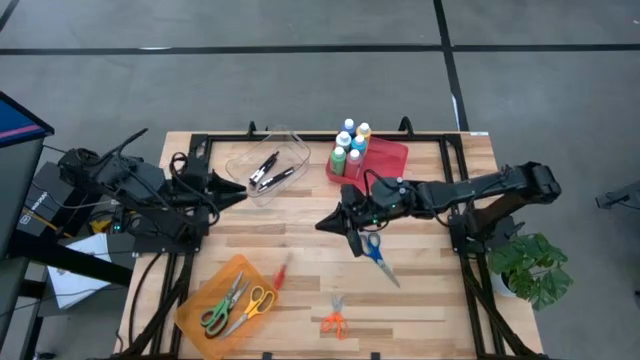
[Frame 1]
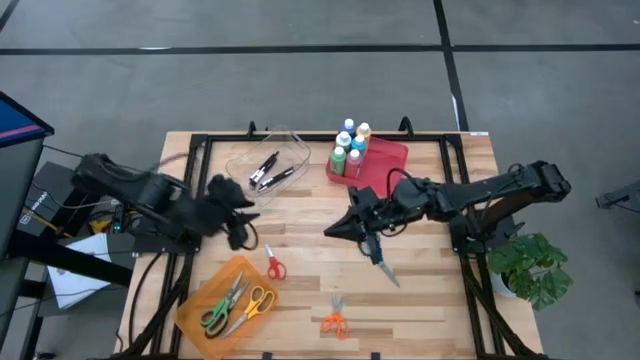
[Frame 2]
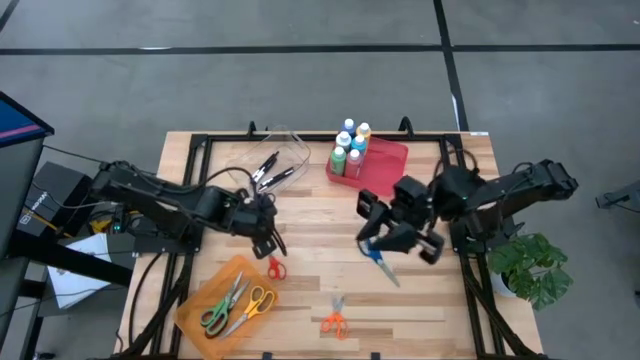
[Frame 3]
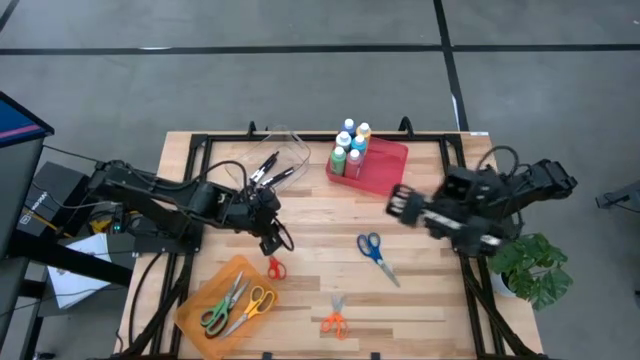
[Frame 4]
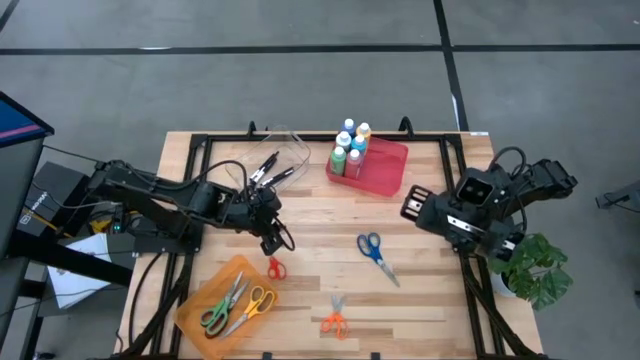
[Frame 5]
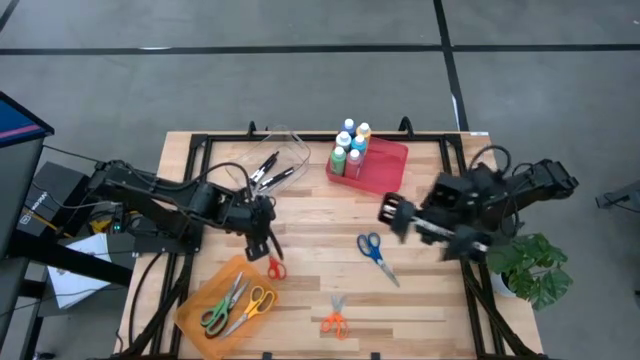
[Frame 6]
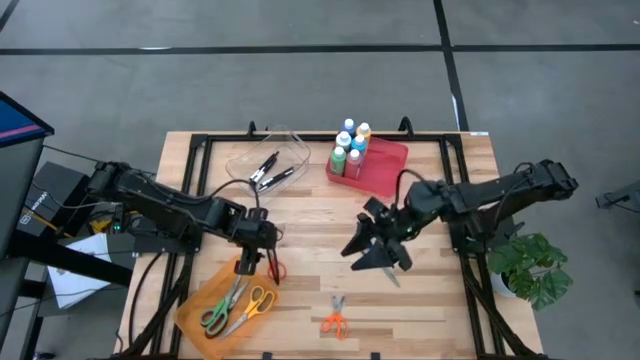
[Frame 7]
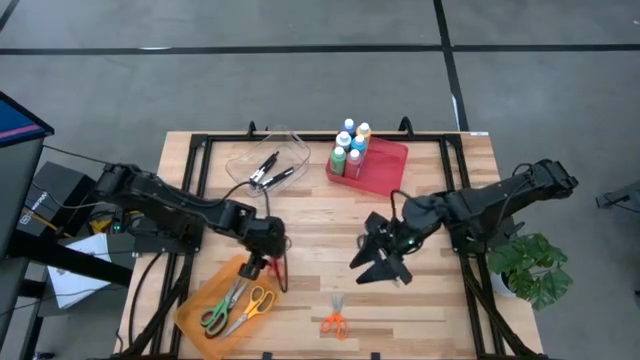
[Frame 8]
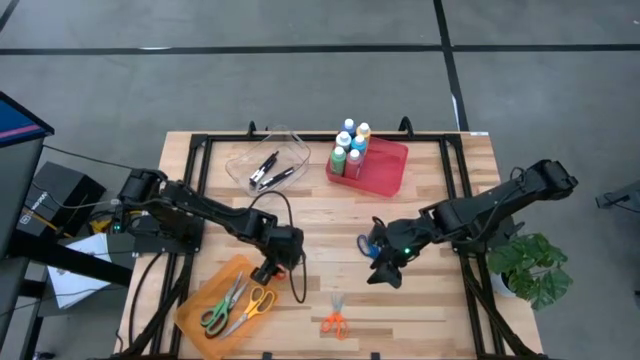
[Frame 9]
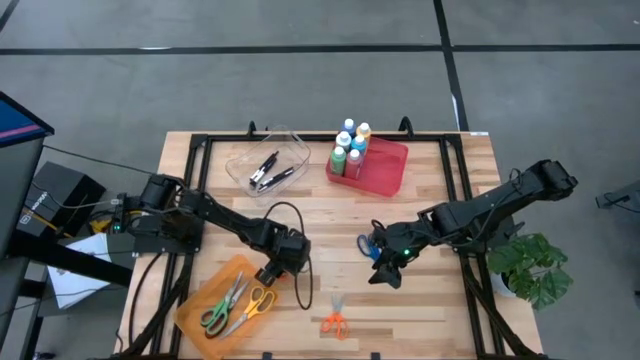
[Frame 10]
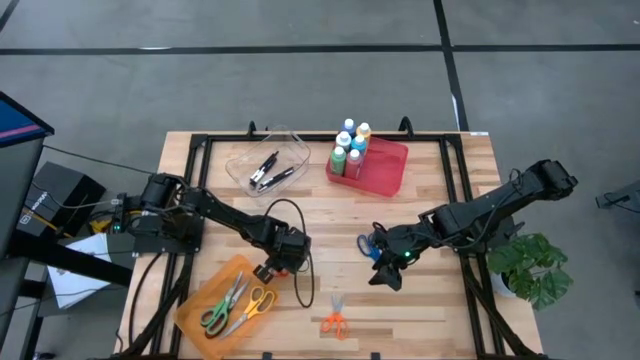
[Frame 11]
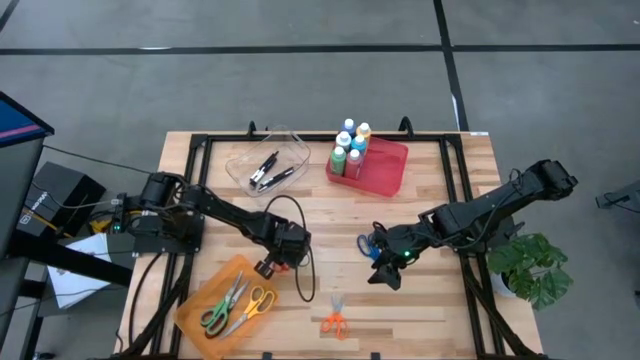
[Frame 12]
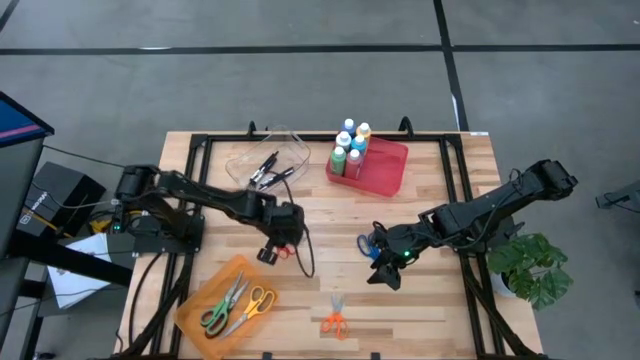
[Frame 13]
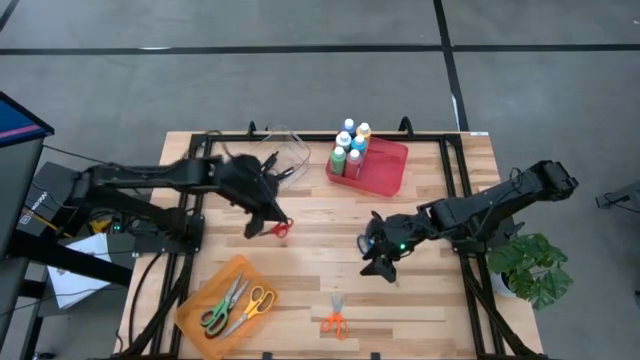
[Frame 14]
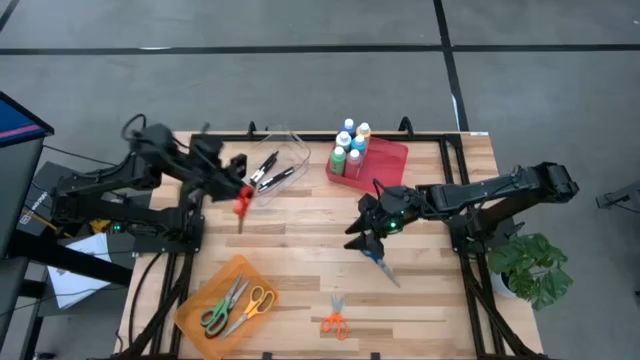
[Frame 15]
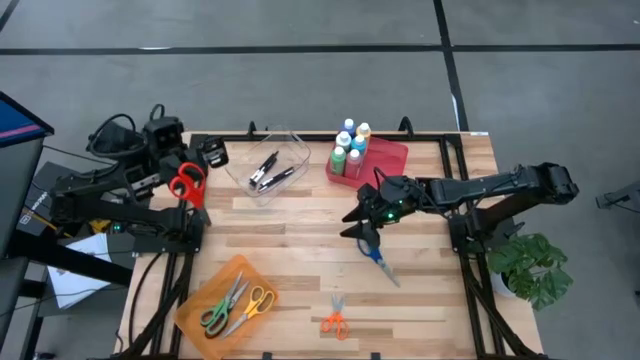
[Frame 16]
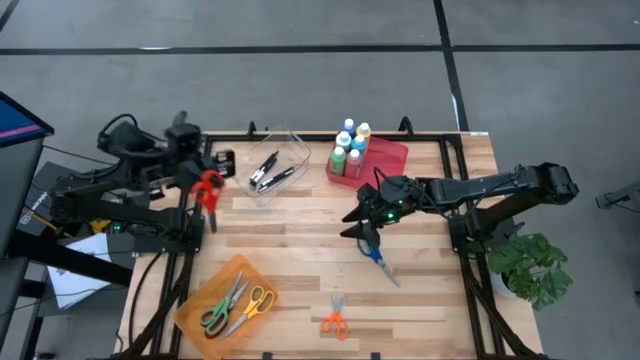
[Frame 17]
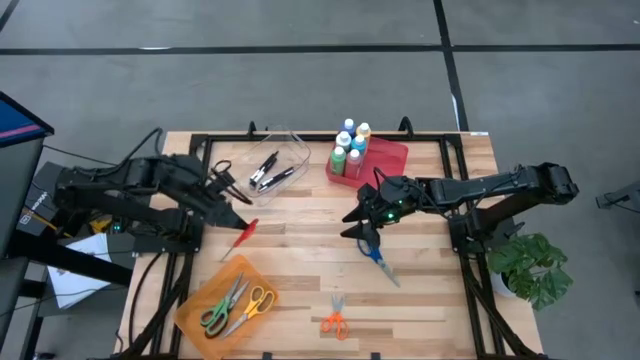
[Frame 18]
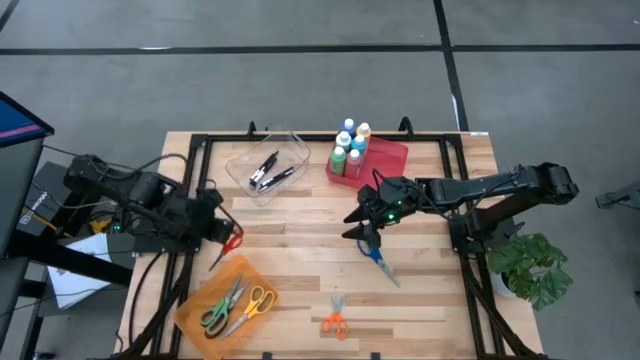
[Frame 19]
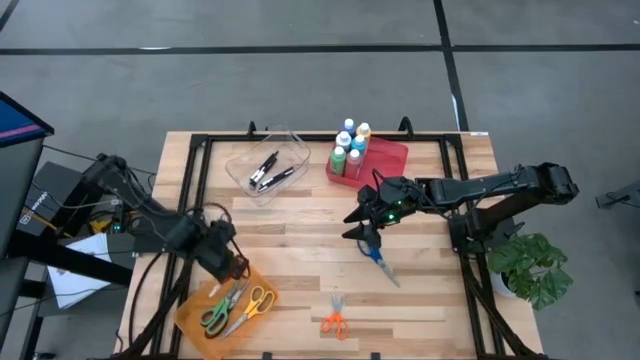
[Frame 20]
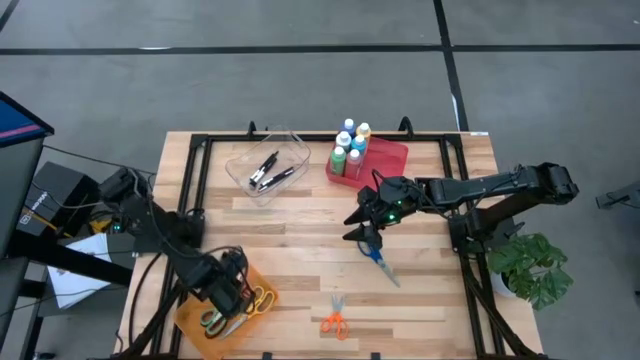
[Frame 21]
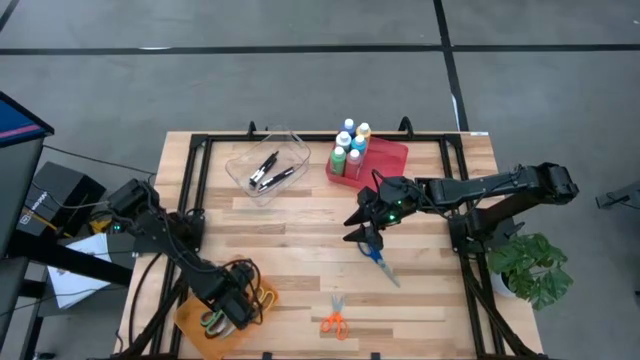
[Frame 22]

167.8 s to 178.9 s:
Task: Pick & Place Paint Supplies
Put the red scissors into the orange bin

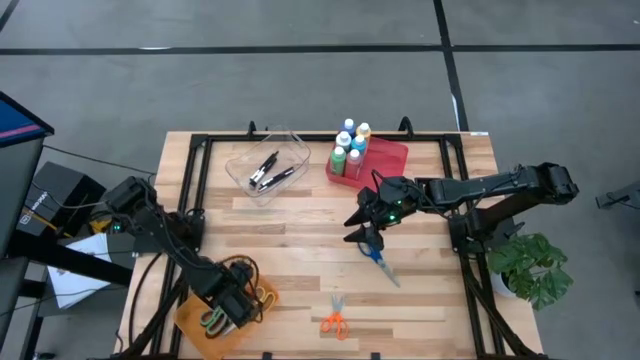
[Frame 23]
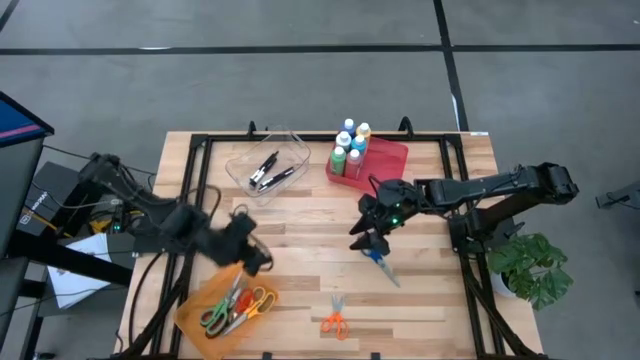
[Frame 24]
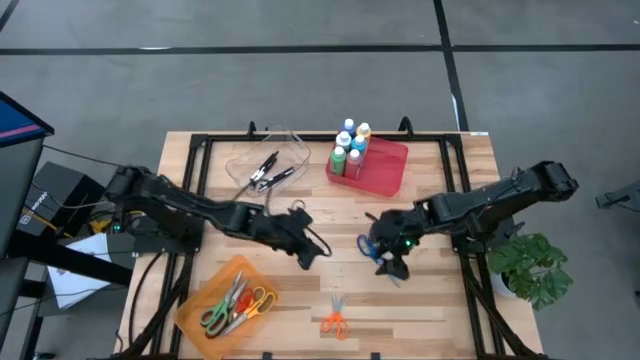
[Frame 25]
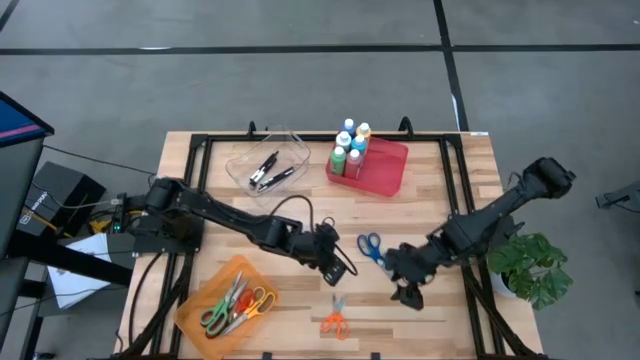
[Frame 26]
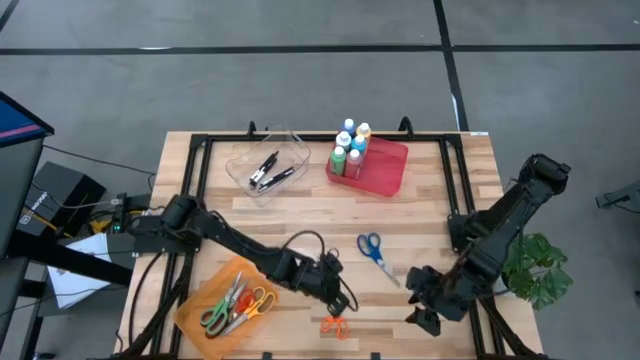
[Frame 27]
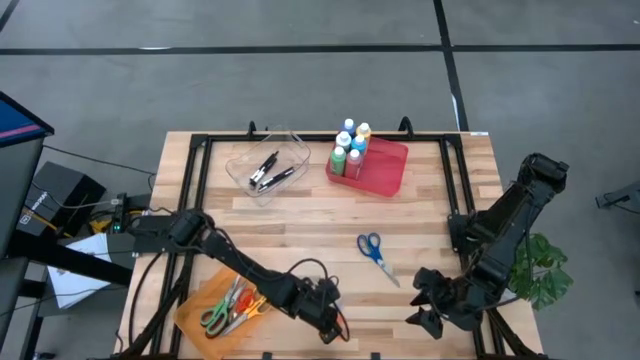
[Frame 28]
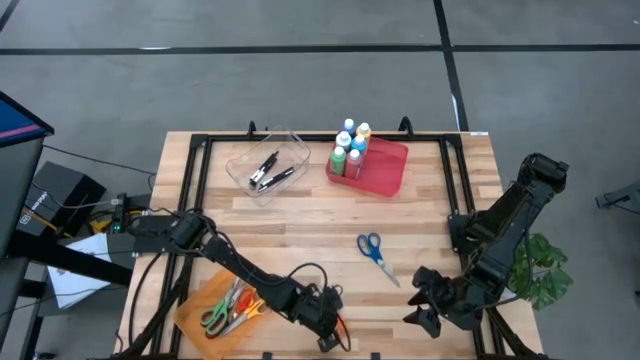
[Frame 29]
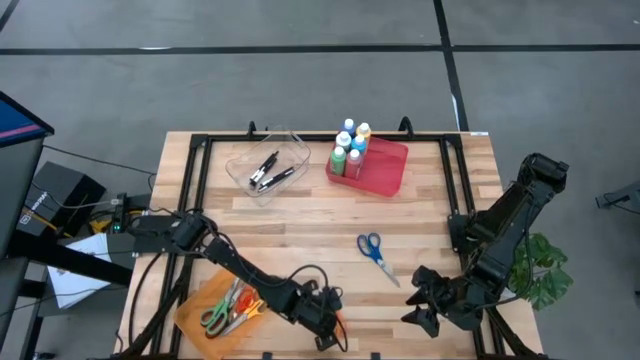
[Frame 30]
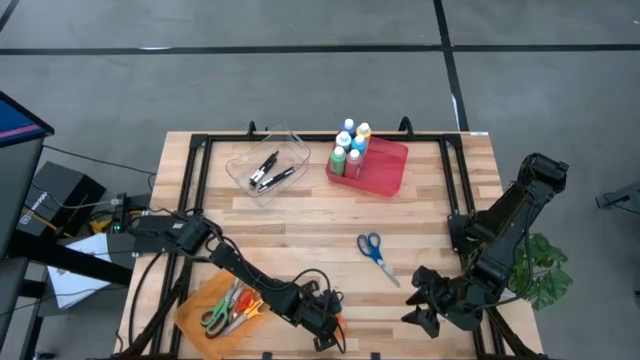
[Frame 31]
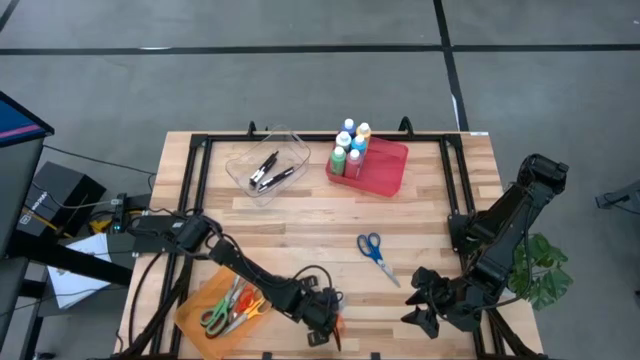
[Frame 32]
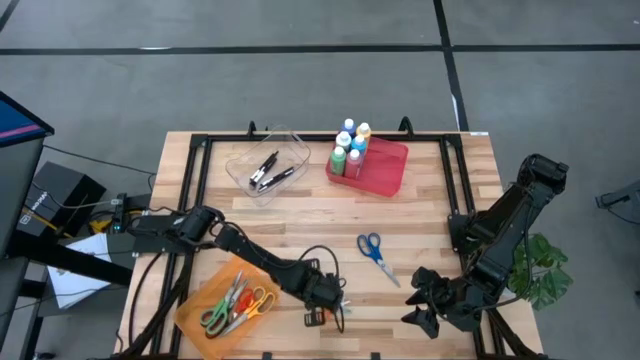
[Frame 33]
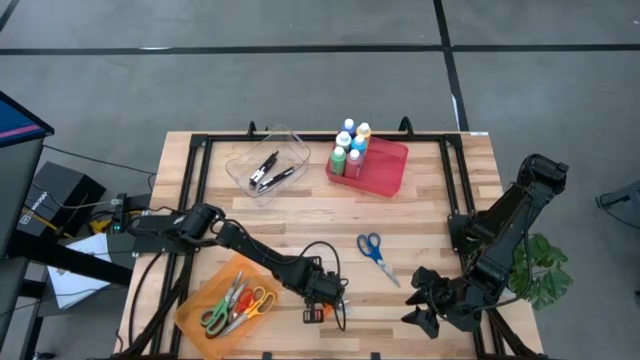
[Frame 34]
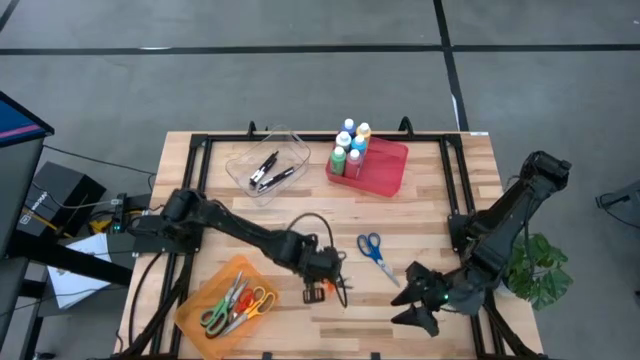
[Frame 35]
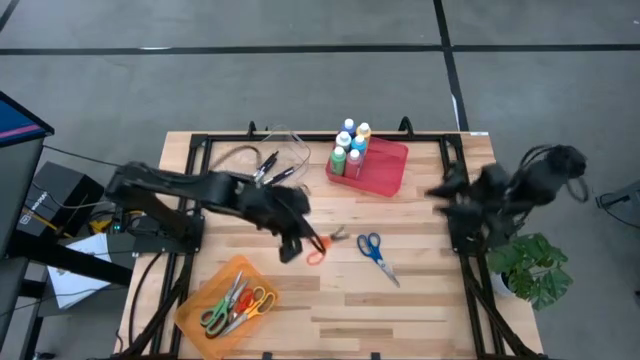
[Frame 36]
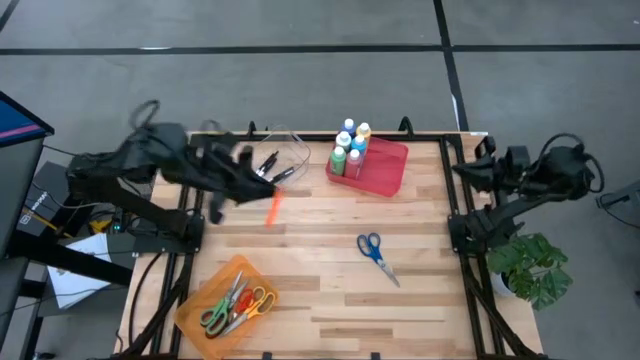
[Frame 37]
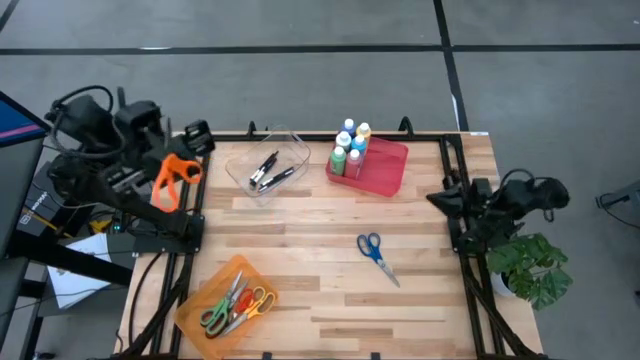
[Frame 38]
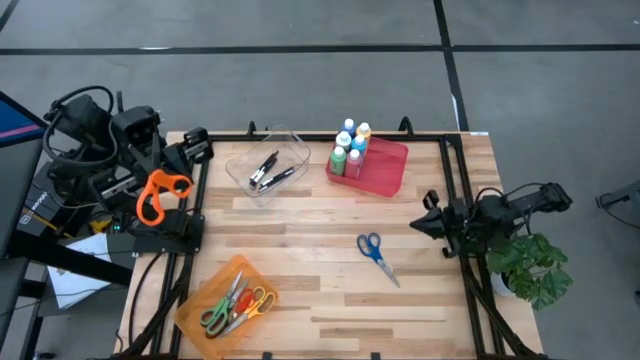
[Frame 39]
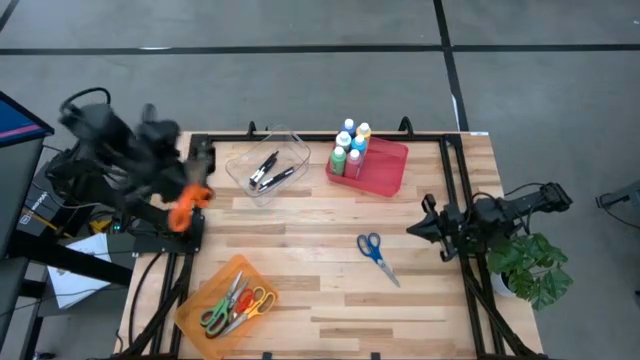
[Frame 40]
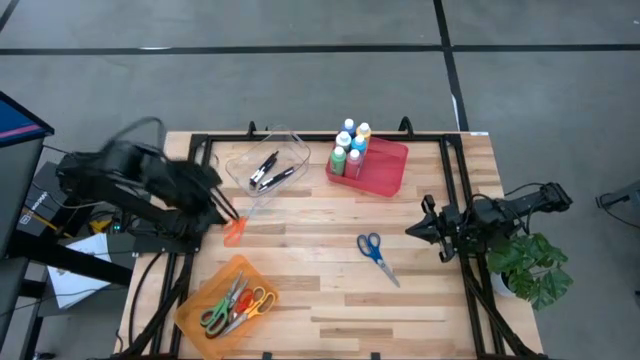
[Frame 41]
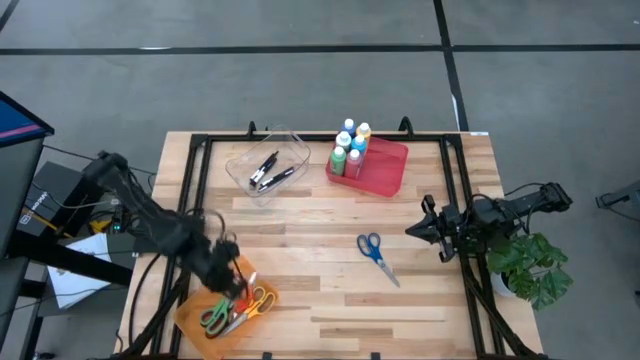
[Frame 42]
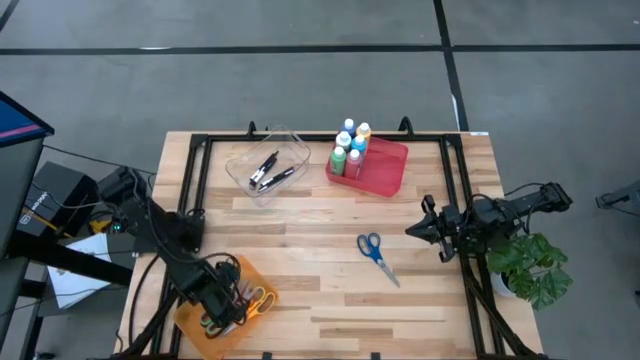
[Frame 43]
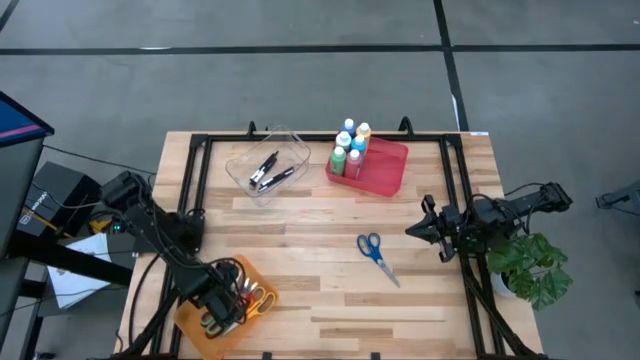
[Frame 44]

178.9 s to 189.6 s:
Put the orange scissors into the orange bin
